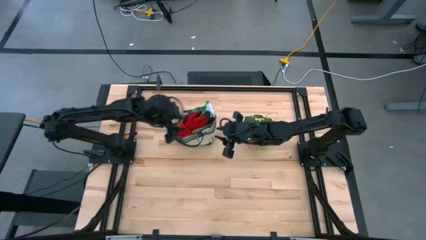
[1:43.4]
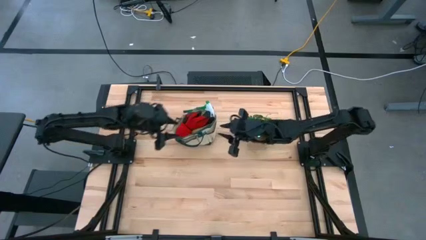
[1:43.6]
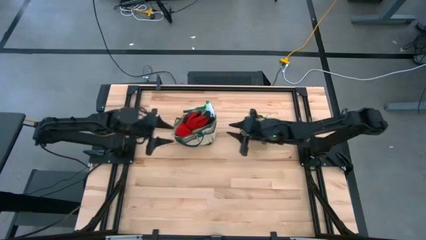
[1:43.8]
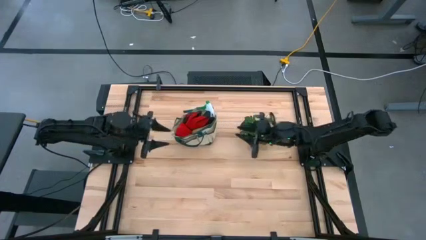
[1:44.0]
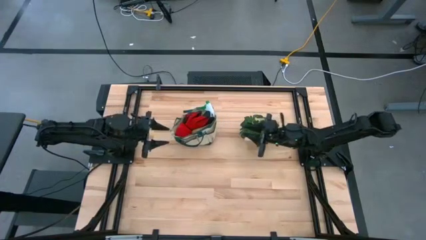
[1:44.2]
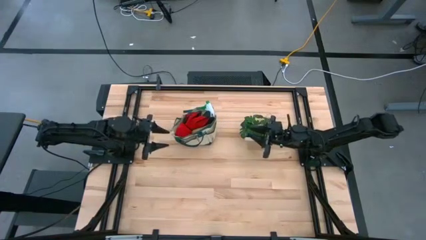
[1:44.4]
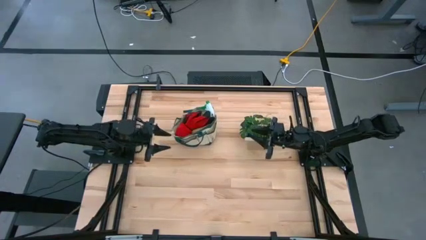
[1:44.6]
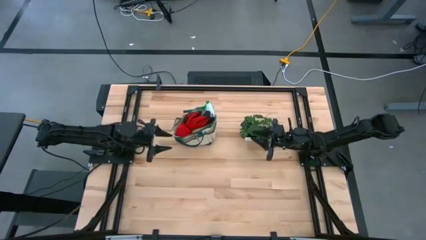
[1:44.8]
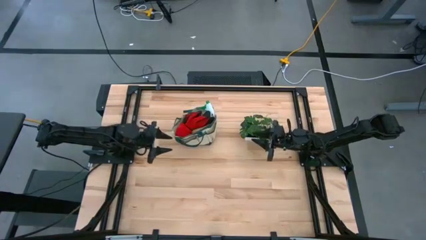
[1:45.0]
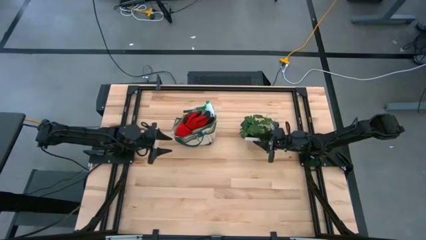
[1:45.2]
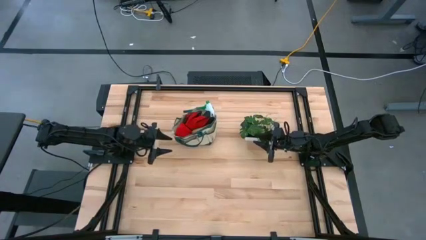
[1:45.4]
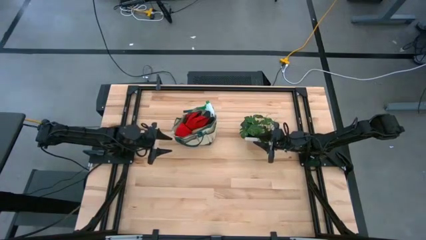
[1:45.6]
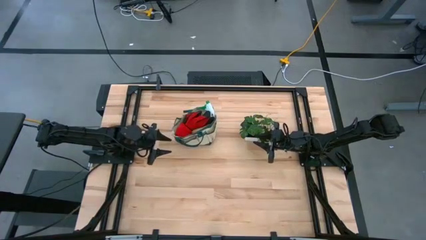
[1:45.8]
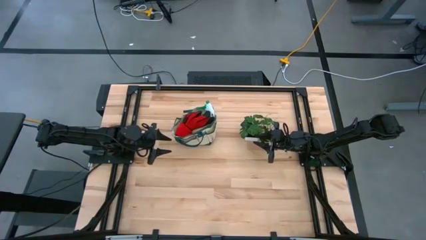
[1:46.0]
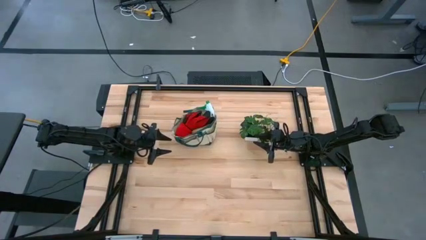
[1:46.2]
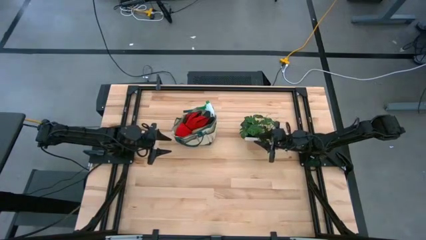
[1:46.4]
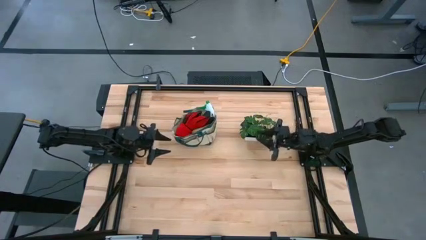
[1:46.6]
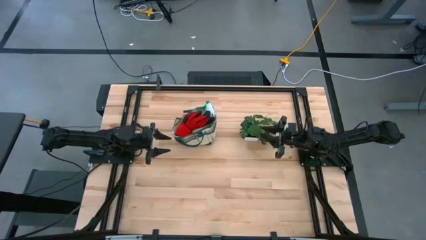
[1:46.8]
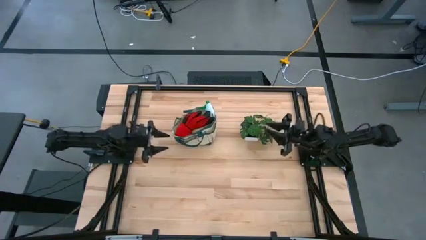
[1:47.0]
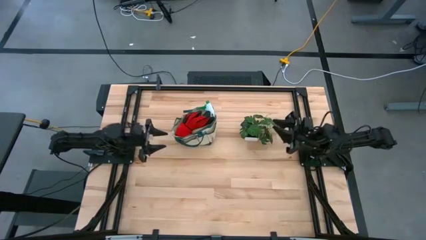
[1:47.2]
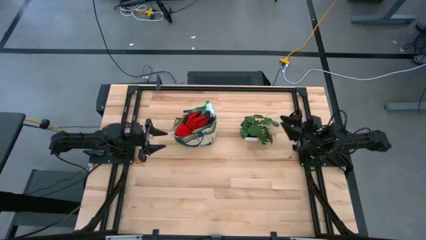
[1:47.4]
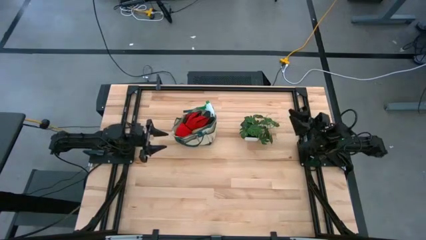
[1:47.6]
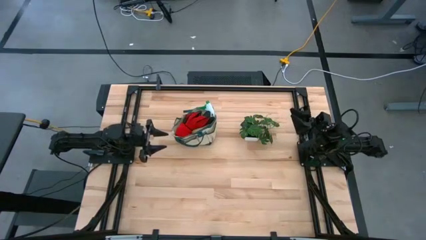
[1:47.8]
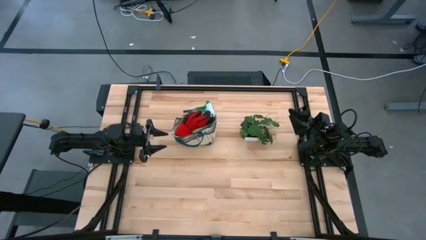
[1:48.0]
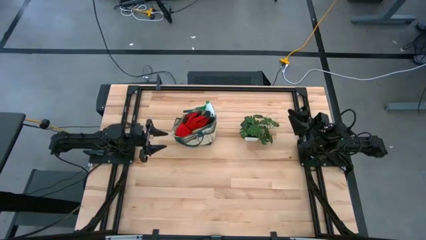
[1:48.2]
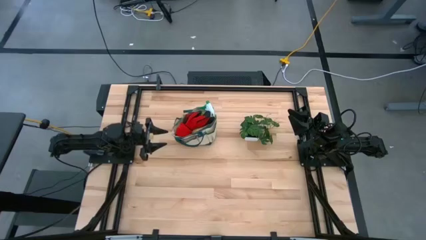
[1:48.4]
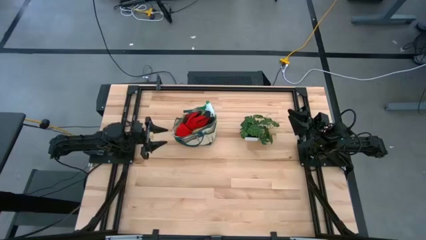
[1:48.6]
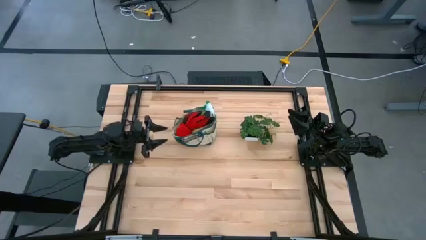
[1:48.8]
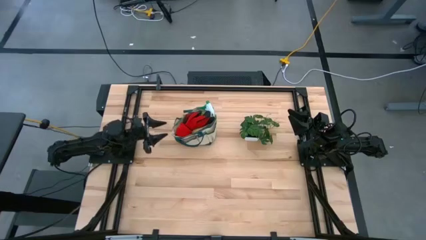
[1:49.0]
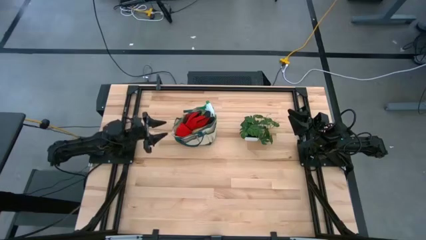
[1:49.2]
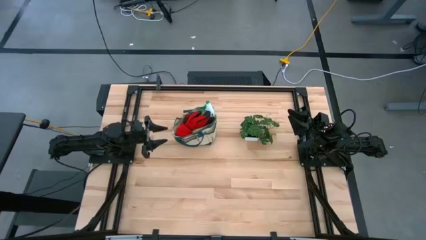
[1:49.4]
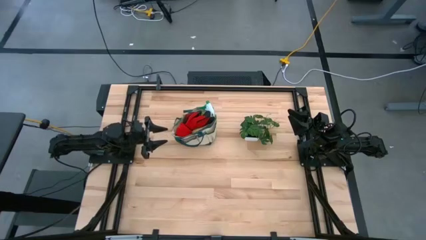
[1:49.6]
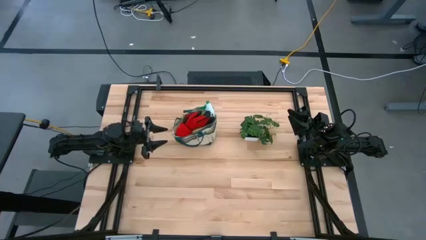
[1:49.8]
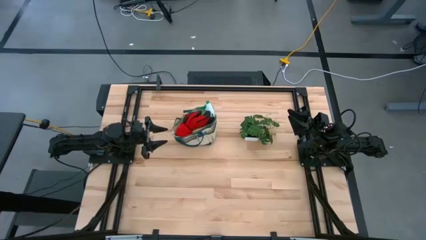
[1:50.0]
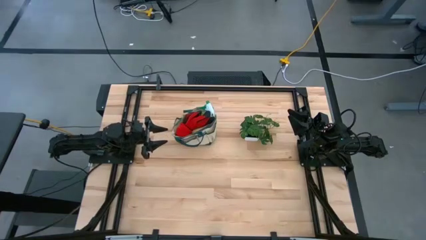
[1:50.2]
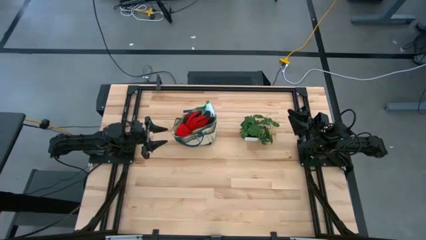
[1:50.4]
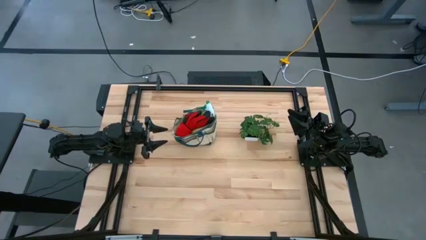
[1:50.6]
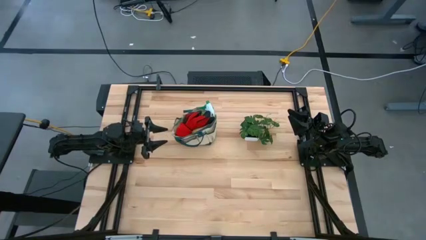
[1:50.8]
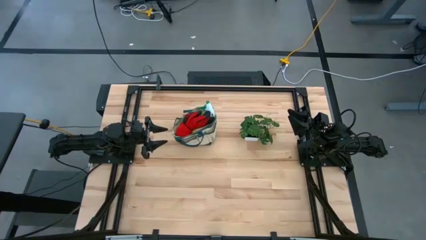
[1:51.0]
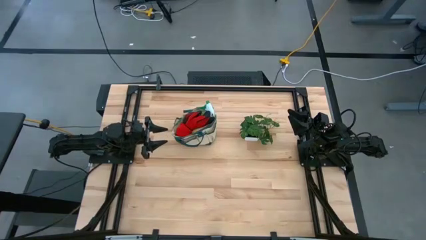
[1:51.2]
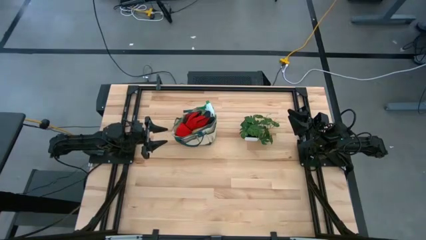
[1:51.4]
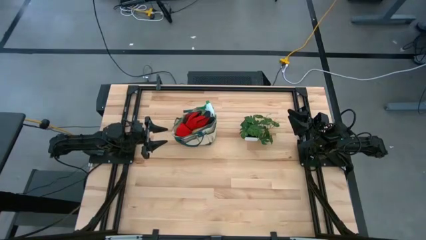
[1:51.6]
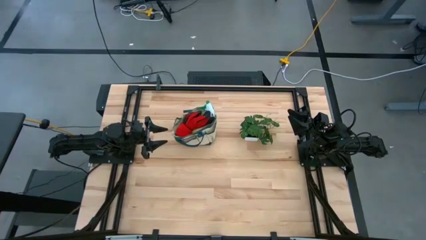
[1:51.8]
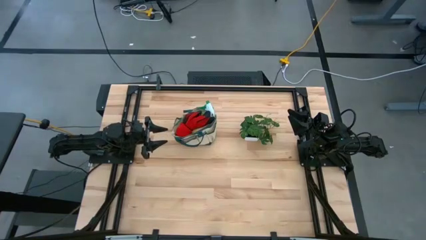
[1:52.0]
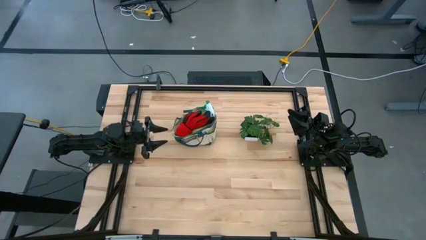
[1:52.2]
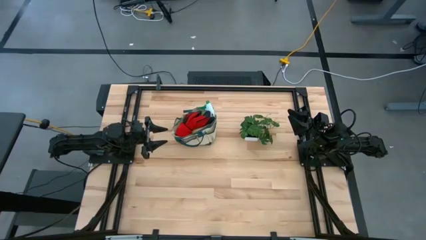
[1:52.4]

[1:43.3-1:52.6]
Task: Pick & Place Garden tools in Gardening bag
Return to Home Position

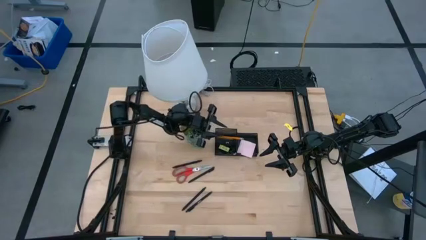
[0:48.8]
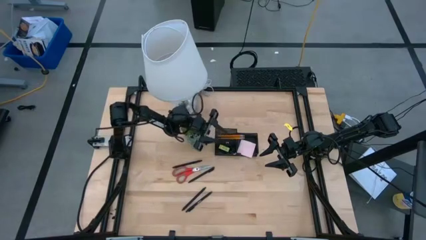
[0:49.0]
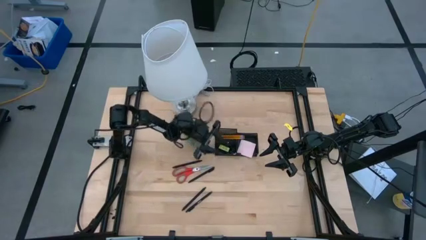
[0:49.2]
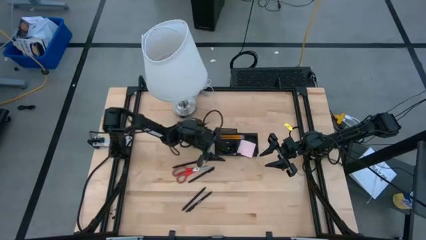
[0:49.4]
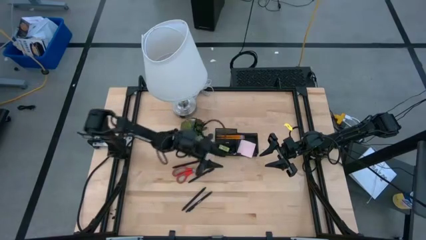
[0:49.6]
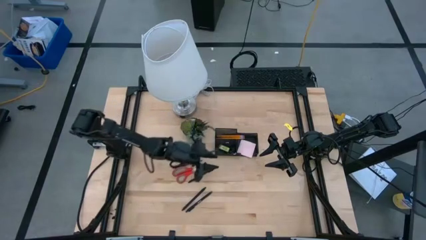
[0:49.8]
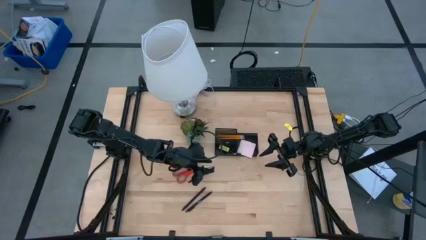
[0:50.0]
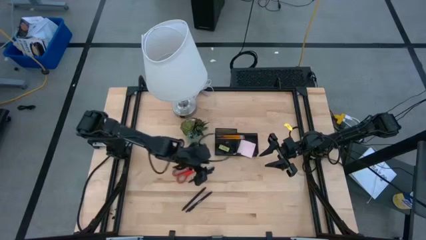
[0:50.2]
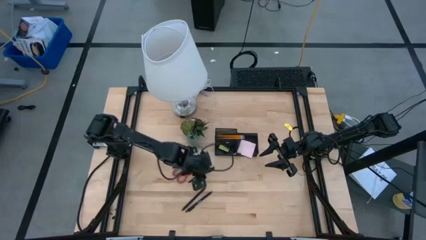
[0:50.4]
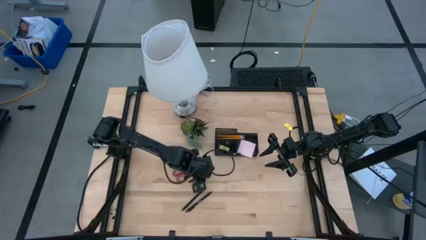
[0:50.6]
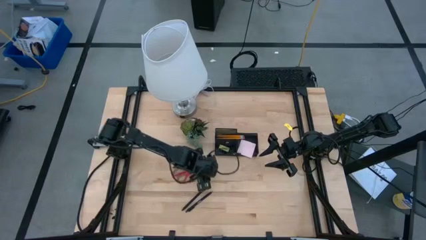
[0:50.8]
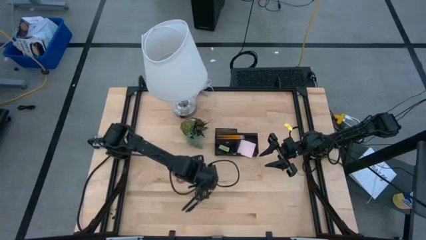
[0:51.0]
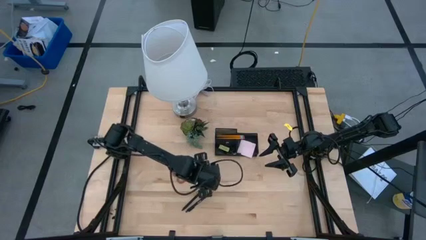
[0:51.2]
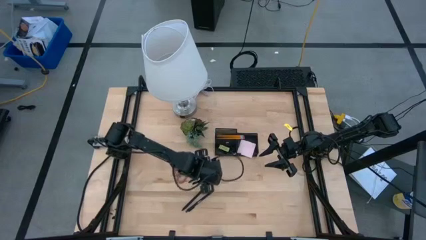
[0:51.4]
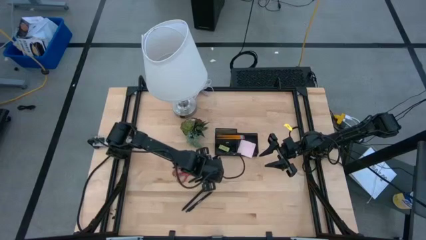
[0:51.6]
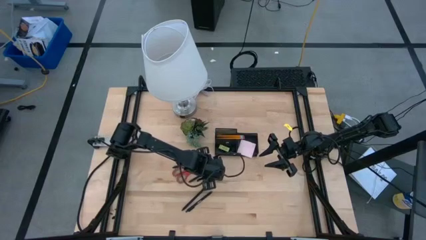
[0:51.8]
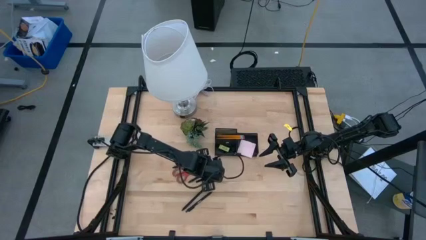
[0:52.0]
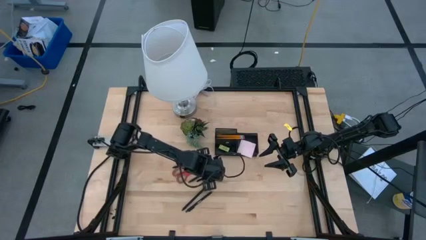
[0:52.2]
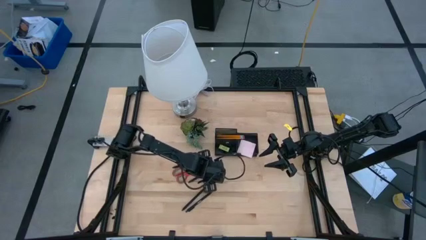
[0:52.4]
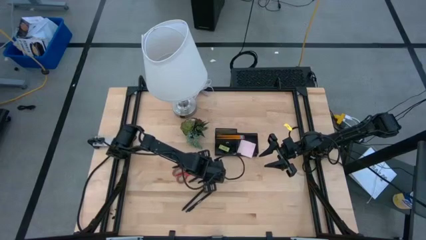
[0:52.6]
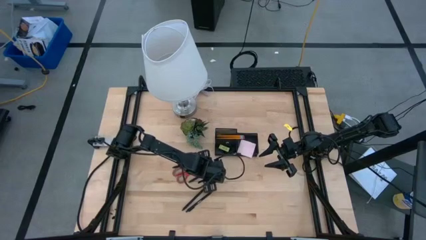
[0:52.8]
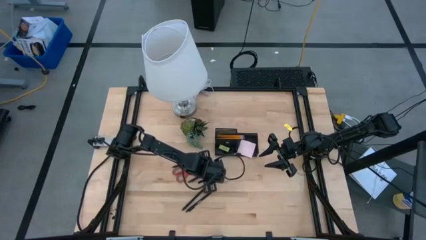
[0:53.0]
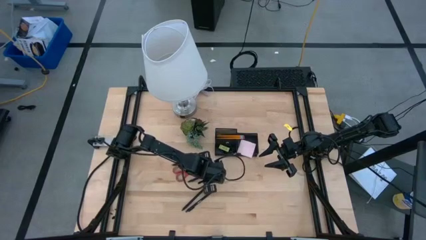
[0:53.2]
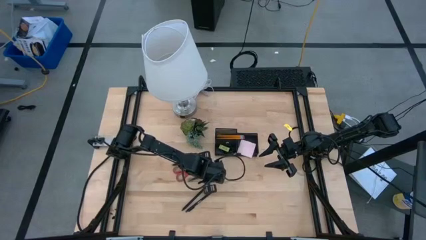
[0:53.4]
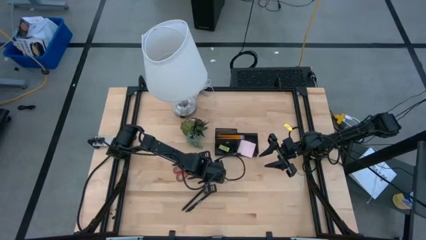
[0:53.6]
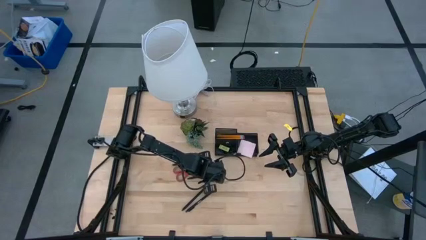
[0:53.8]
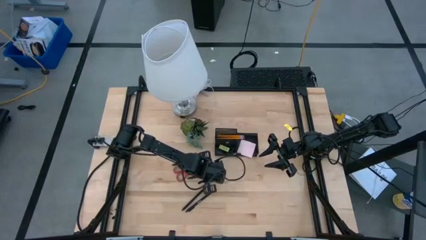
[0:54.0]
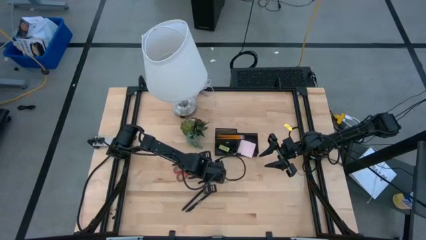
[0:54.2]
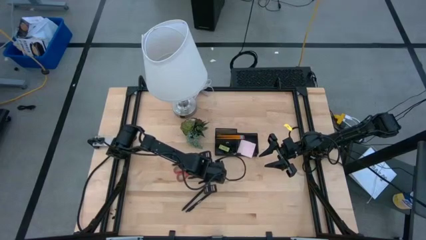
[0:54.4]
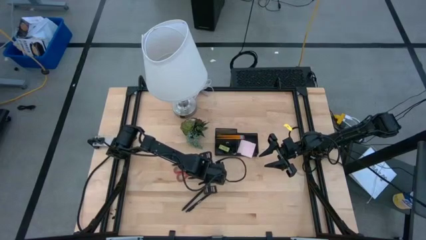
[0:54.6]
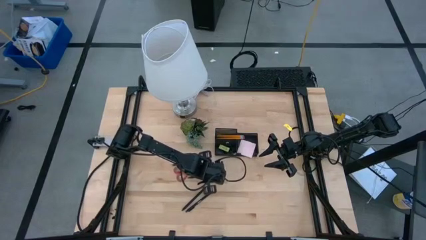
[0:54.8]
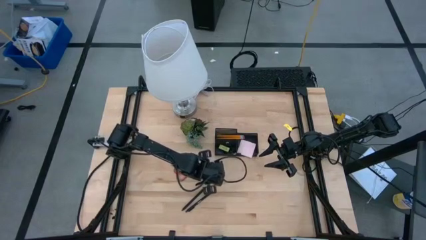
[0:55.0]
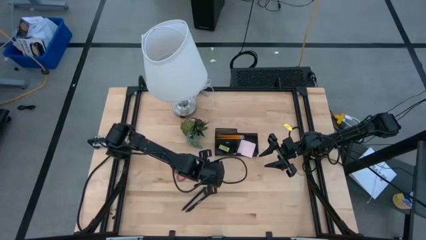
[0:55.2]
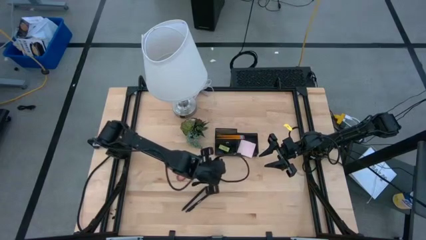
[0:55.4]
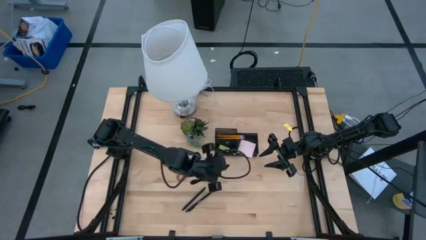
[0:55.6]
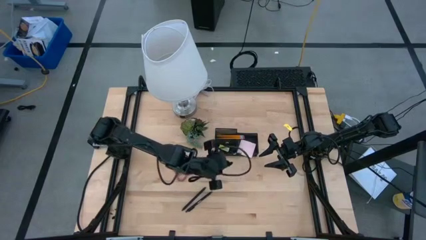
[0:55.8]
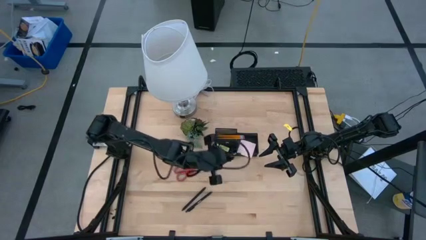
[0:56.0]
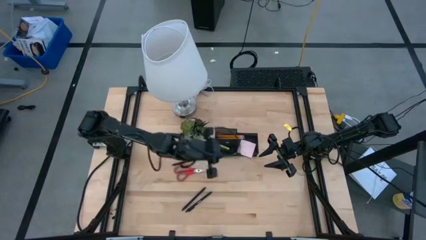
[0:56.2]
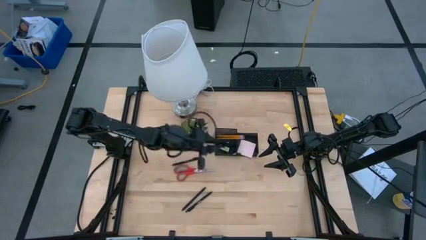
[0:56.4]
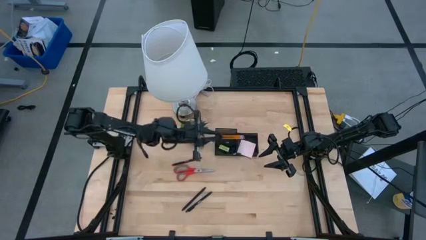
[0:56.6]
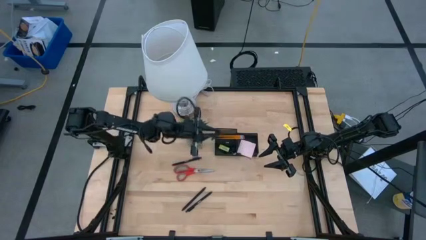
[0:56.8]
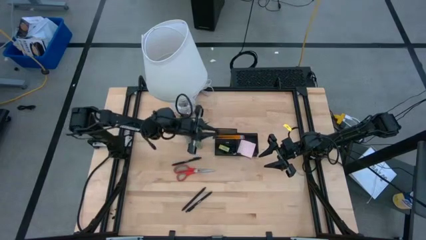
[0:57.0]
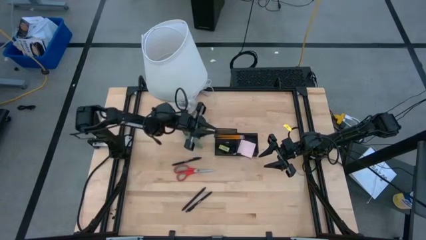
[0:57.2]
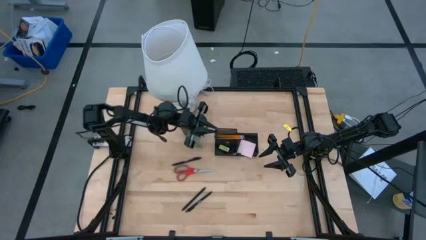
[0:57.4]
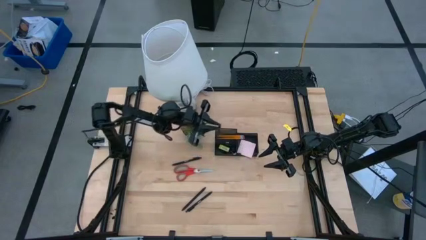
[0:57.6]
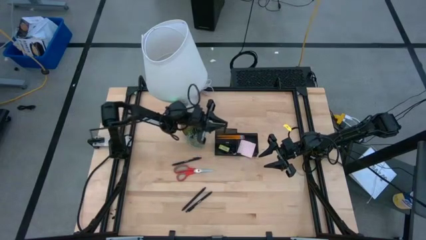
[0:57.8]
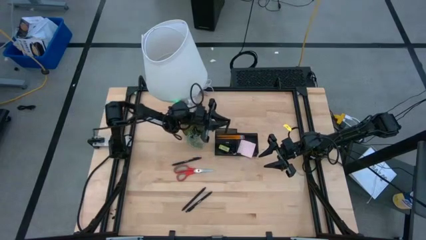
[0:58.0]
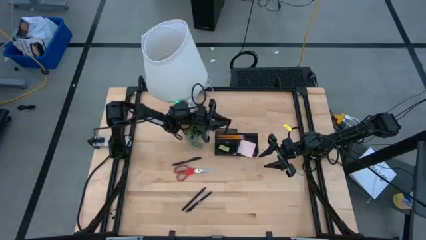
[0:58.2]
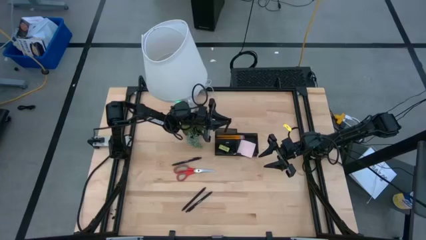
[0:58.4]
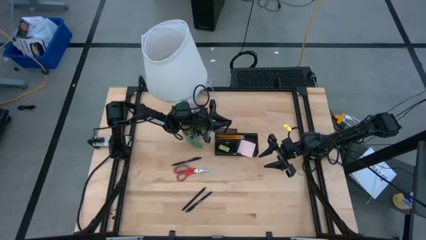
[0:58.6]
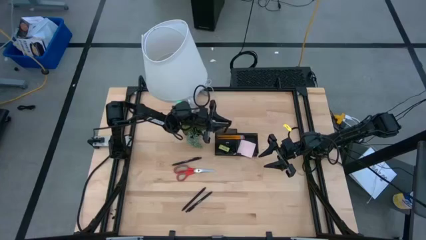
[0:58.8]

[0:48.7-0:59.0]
Task: Pick and place office supplies into organizer
Put the black pen into the desk organizer
